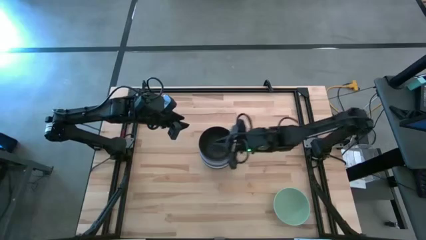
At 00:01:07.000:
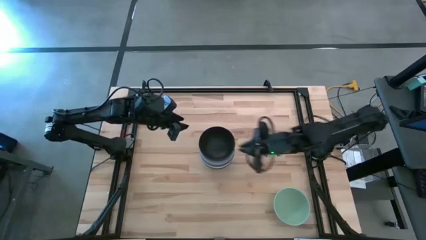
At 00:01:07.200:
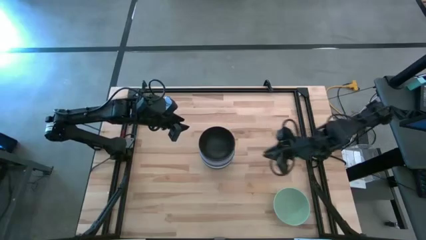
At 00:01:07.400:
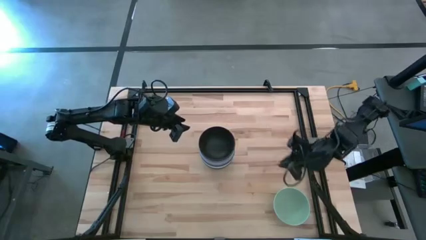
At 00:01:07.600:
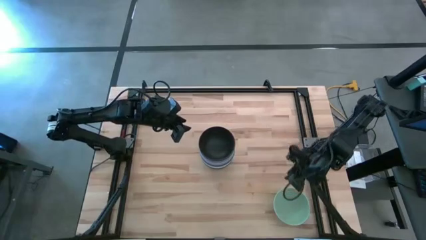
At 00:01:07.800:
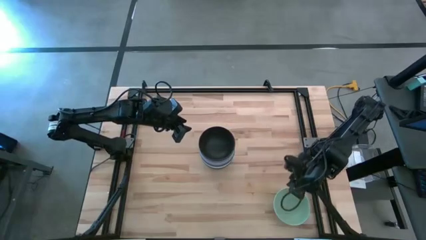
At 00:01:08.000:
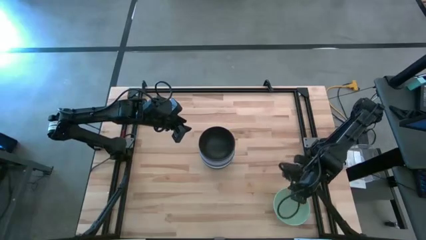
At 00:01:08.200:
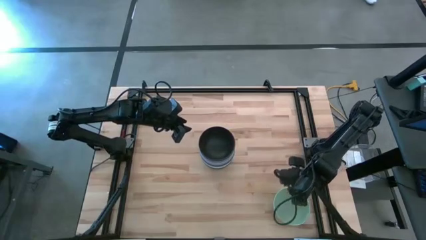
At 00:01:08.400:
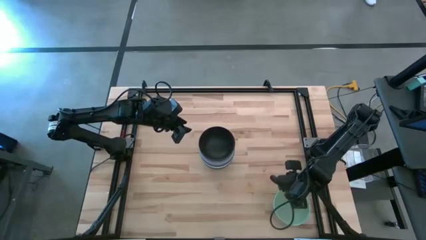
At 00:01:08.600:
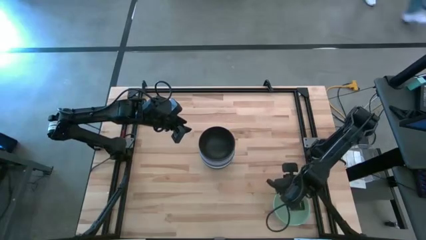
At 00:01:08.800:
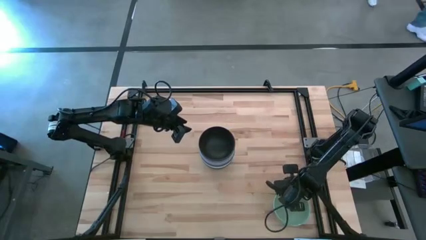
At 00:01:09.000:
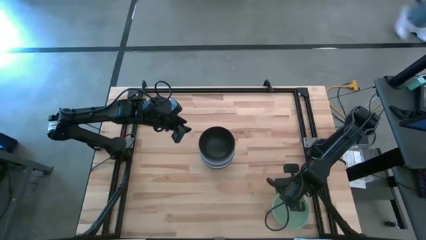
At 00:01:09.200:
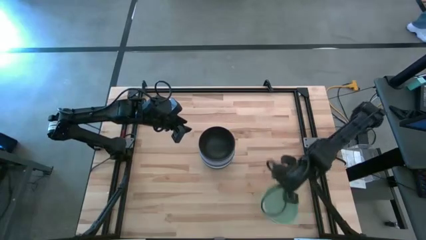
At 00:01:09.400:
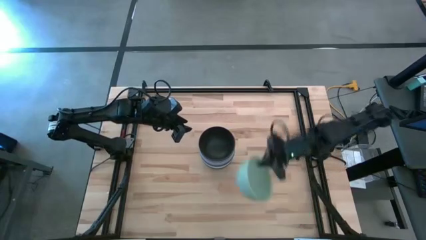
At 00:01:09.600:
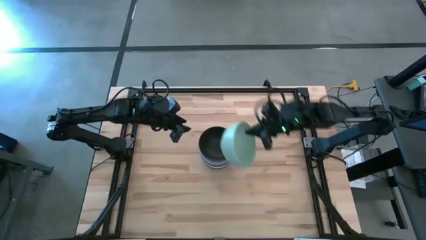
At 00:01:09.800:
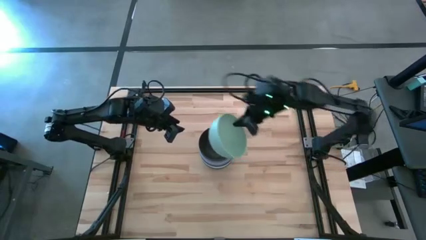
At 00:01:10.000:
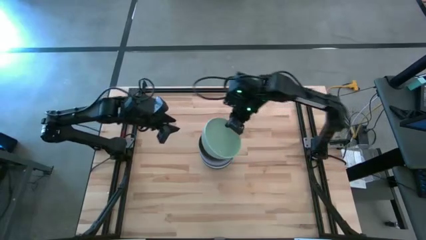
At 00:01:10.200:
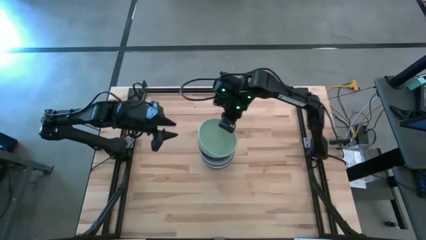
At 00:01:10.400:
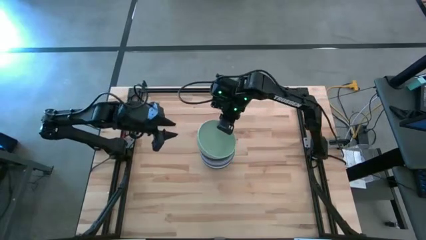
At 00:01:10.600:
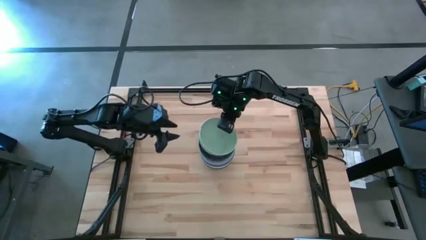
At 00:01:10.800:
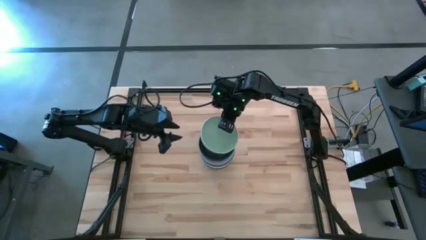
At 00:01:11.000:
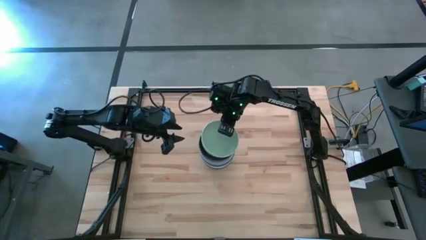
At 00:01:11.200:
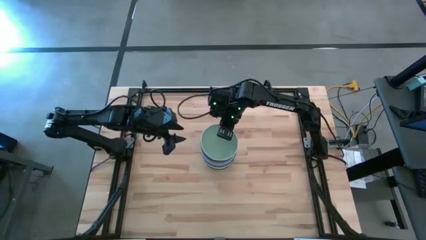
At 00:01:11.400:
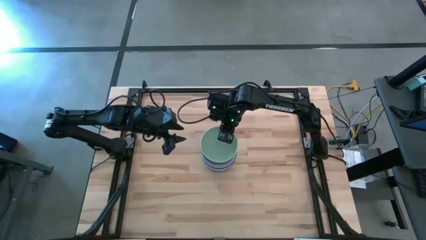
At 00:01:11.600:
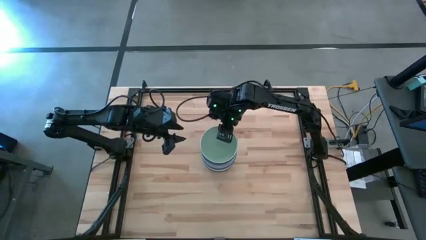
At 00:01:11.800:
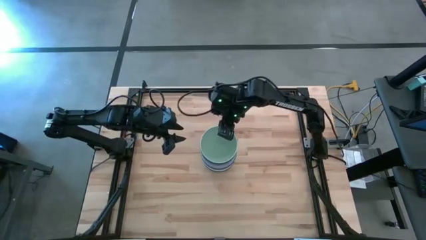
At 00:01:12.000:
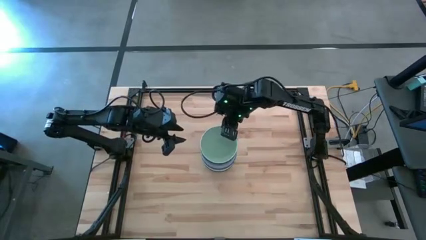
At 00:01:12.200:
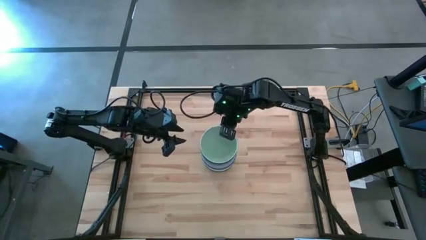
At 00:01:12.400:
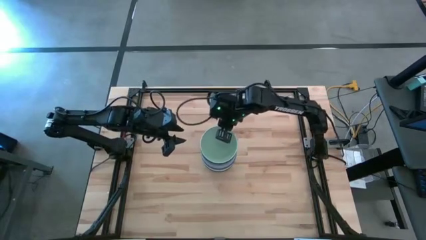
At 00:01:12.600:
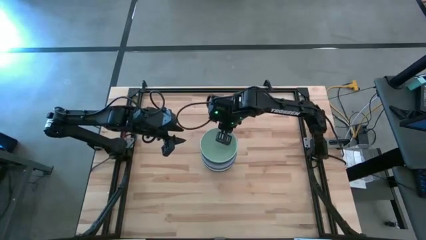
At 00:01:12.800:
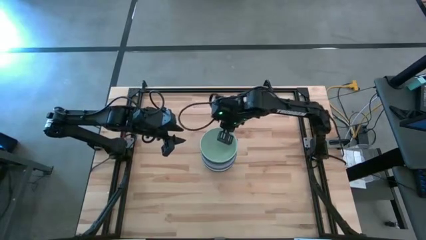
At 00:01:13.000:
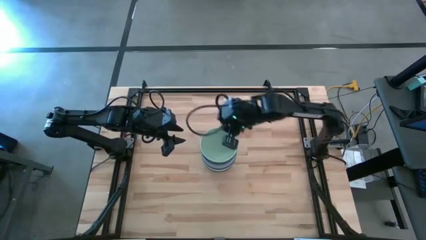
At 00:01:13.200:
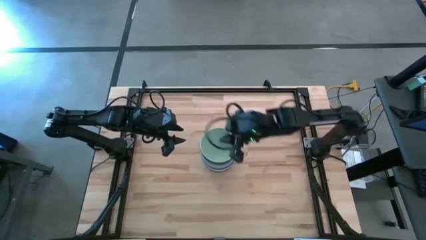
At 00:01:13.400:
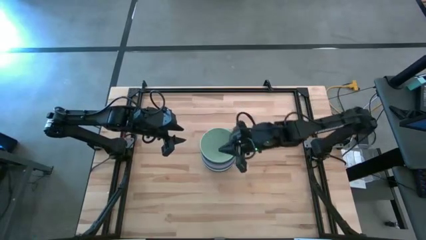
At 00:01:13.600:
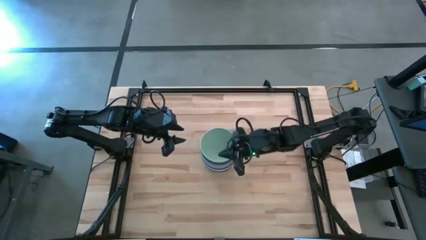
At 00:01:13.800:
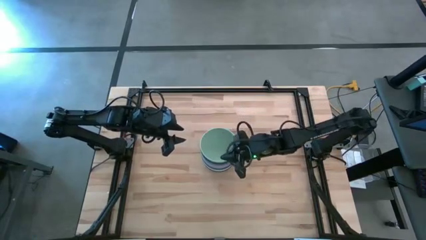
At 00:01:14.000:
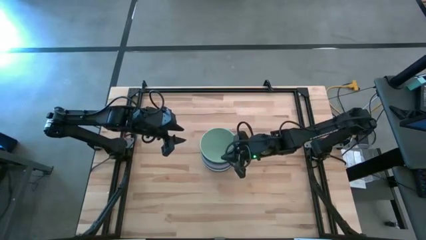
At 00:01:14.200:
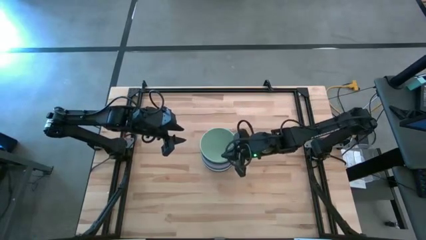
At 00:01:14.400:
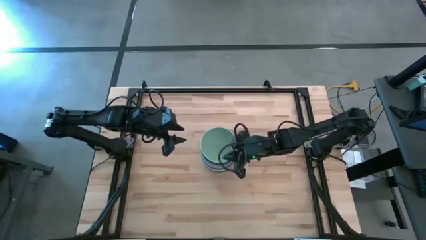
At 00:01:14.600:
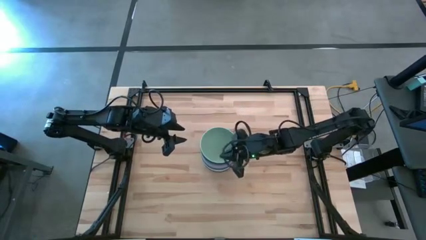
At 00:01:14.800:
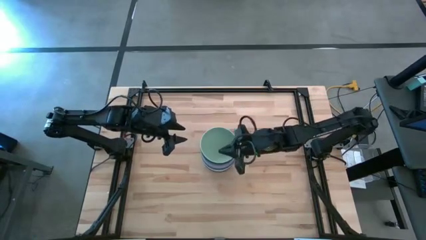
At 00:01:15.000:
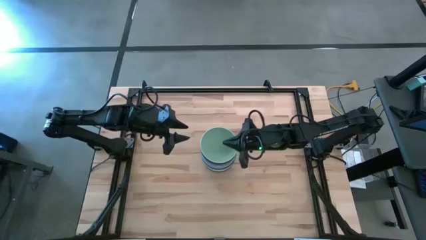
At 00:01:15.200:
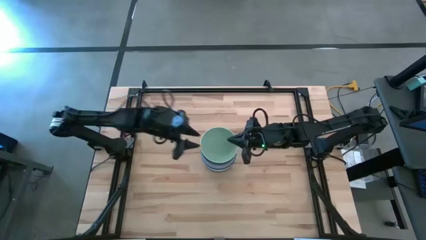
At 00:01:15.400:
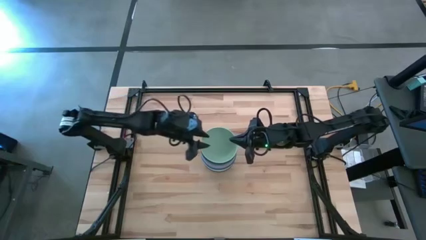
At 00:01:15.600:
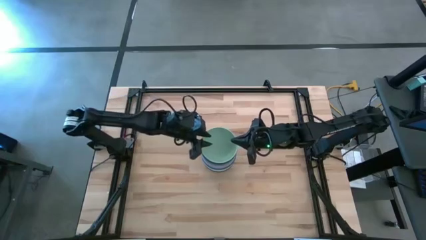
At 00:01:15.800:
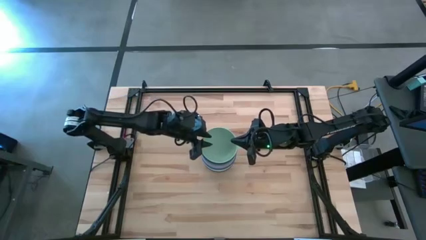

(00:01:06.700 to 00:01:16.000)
Task: Nest bowls inside each other
Stack the light green bowl on top of the black bowl

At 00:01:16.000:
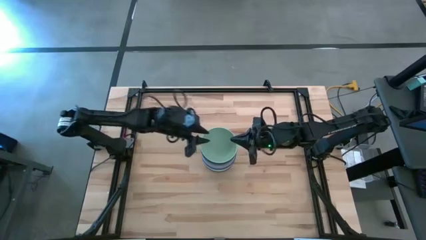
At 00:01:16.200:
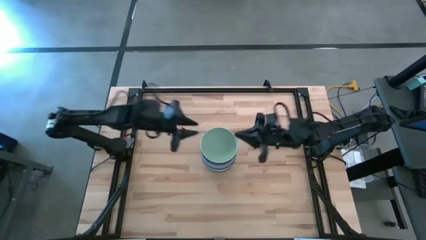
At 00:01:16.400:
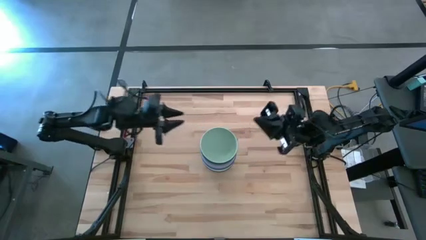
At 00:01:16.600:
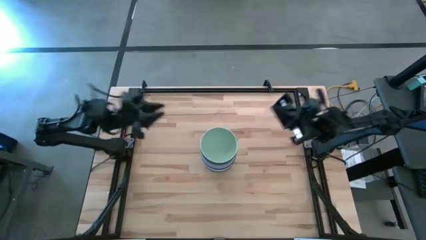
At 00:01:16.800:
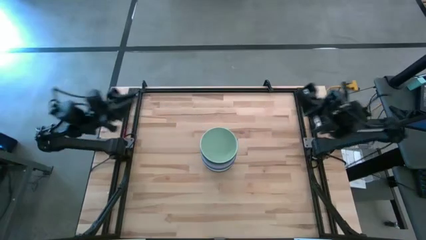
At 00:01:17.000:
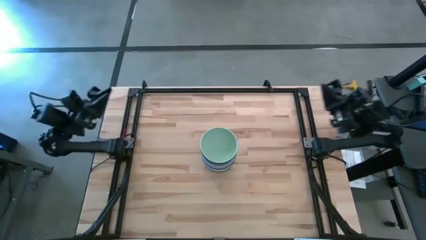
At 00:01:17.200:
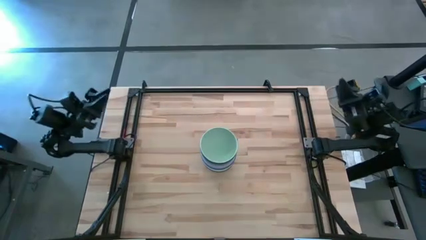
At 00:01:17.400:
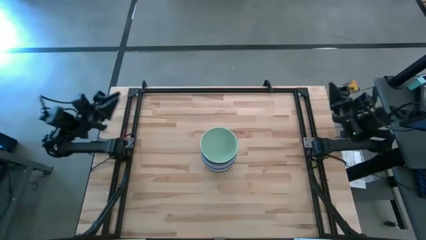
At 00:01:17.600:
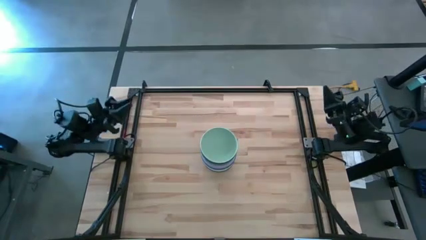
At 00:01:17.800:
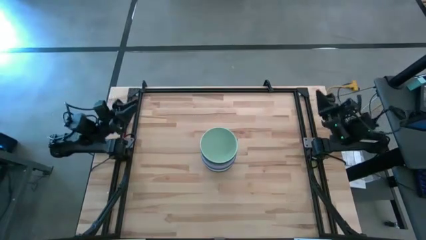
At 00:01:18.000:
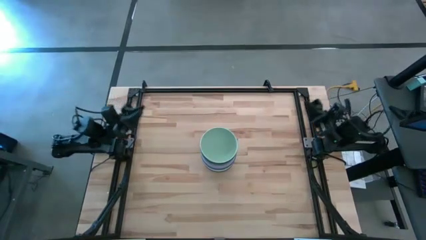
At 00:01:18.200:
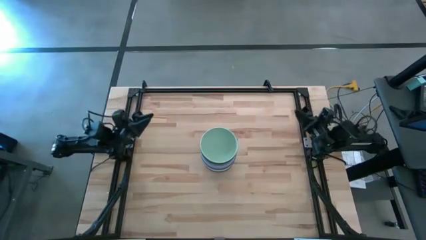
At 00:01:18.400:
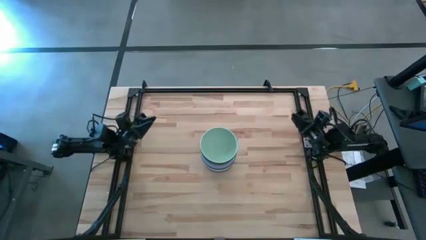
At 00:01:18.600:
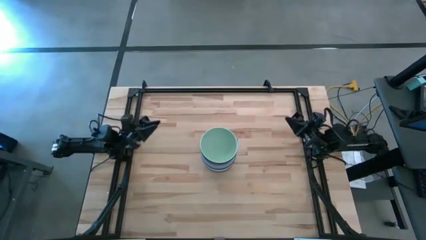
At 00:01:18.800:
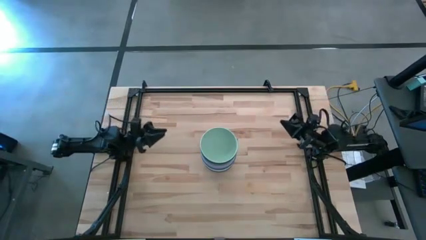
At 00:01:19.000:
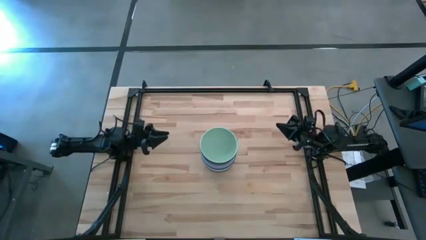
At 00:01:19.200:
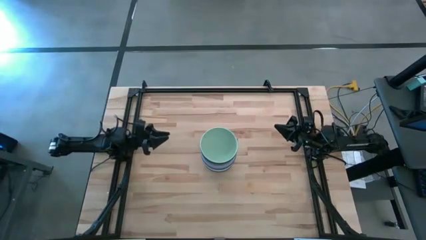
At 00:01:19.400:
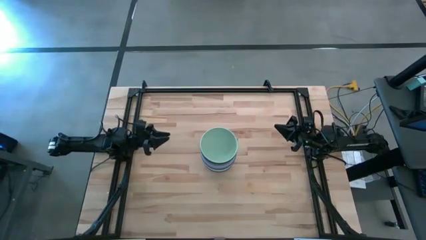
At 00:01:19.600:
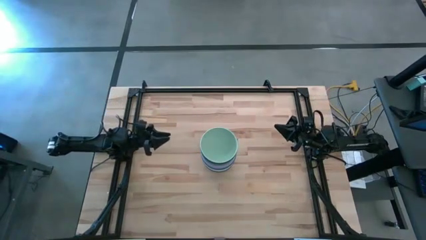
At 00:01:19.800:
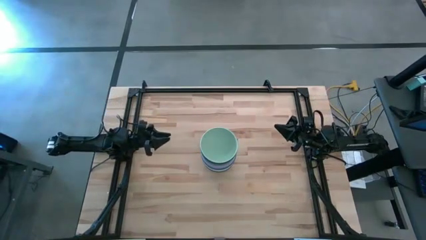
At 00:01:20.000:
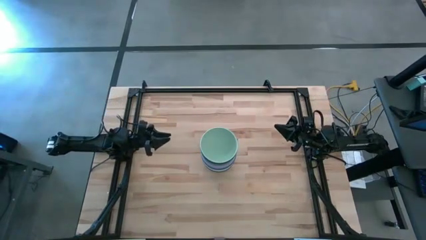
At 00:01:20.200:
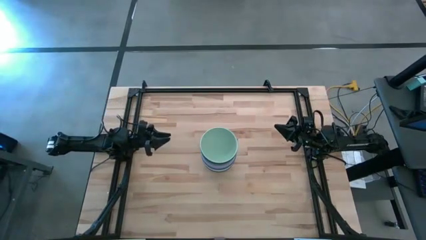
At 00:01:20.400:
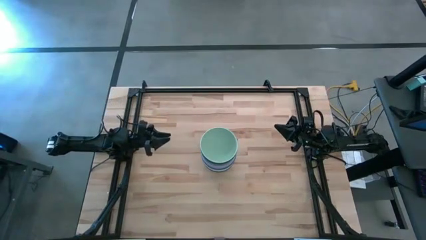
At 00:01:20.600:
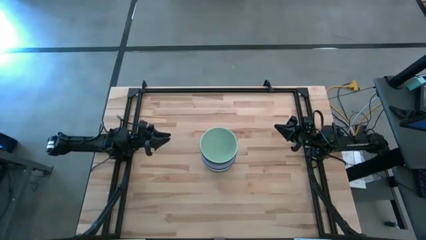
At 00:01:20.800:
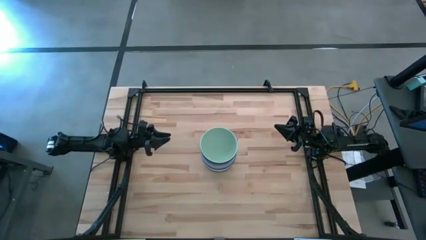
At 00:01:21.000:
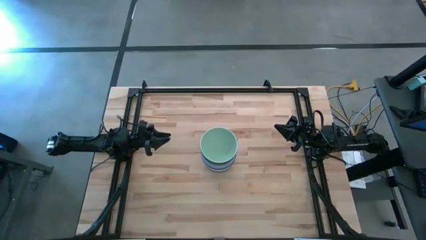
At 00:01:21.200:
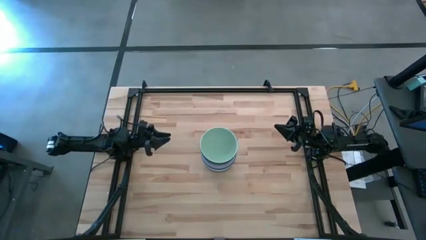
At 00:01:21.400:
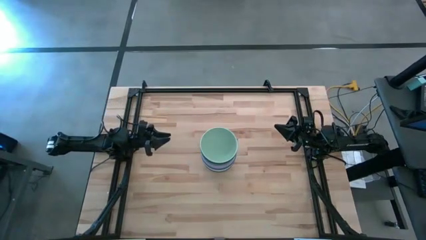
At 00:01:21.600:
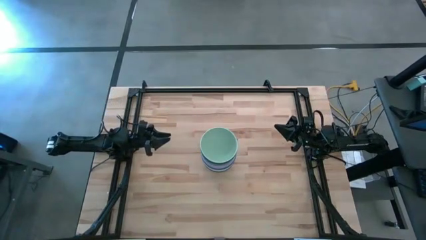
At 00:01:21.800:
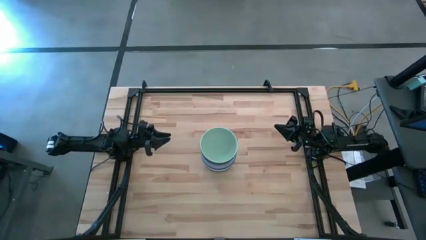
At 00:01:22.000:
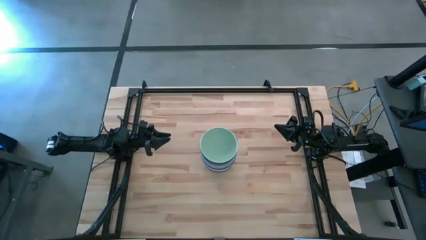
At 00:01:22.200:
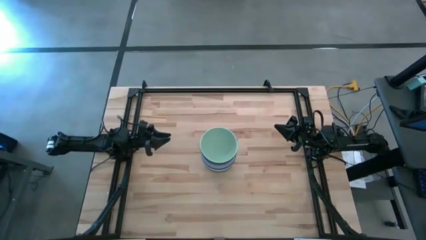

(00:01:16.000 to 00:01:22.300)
Return to Home Position

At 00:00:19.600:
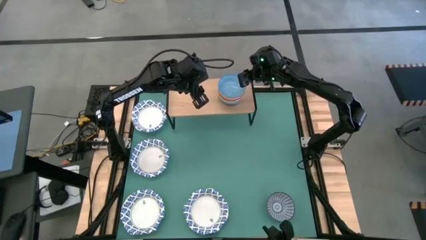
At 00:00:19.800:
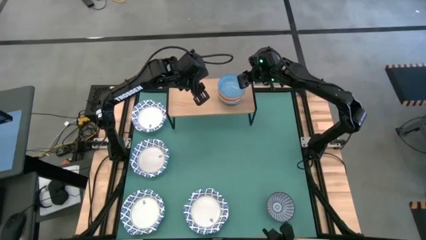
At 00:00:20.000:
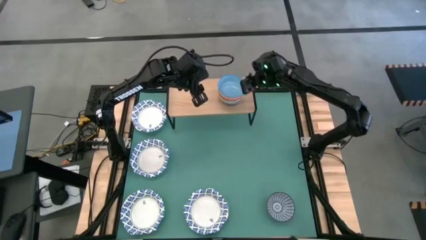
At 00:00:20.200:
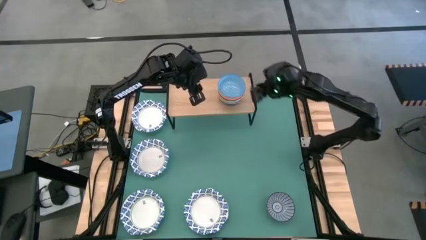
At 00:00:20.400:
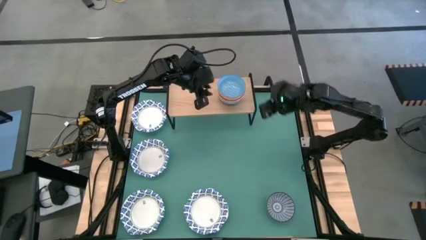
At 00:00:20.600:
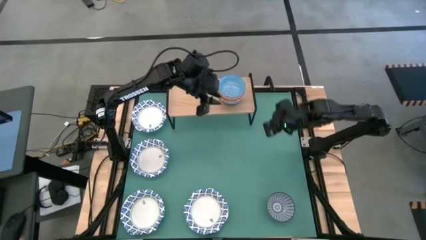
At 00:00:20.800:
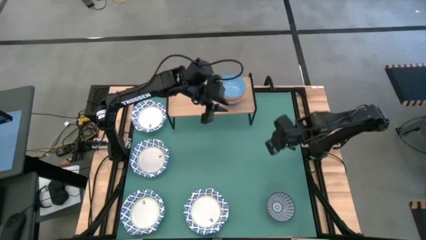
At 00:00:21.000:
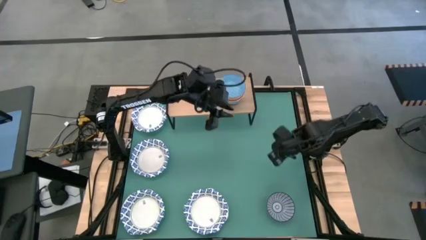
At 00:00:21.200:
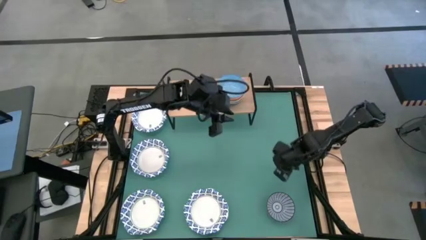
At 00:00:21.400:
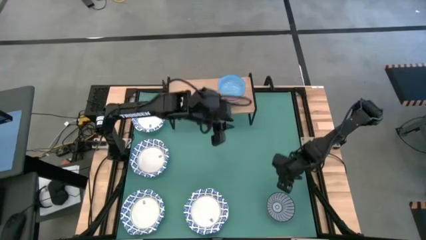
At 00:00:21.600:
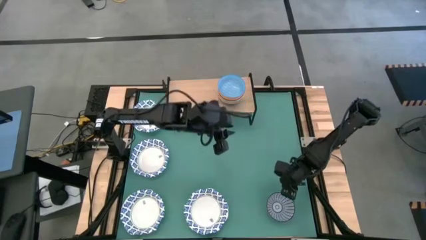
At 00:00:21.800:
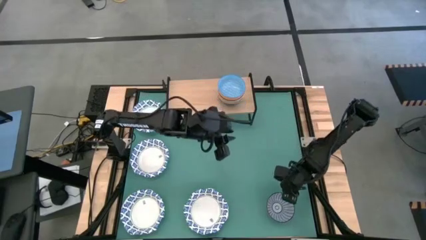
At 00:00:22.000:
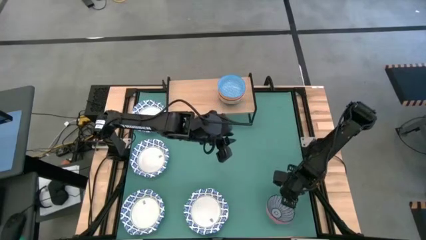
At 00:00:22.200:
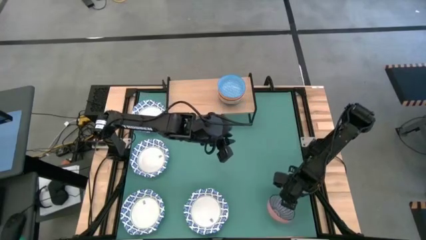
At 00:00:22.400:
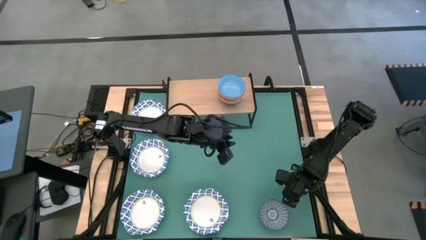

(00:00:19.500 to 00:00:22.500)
Task: Place and stack bowls onto a shelf
Stack the small dark blue bowl on the small blue bowl on the shelf
